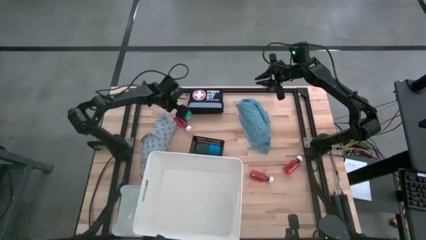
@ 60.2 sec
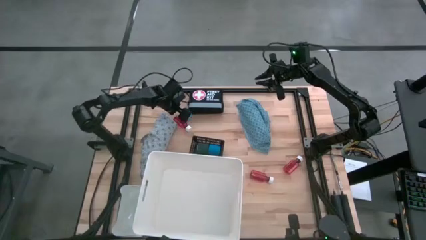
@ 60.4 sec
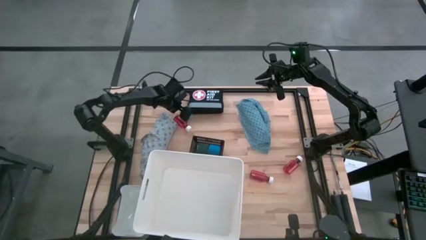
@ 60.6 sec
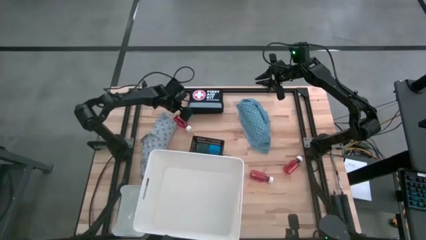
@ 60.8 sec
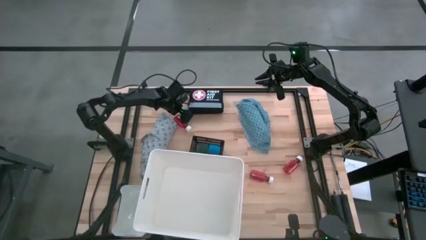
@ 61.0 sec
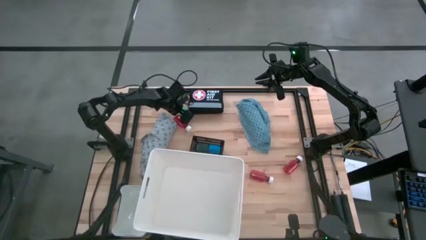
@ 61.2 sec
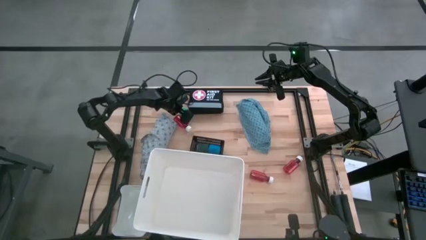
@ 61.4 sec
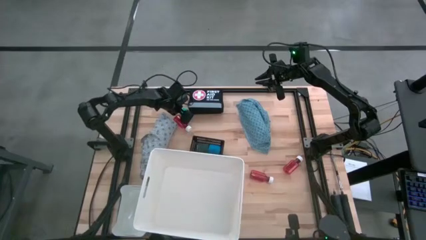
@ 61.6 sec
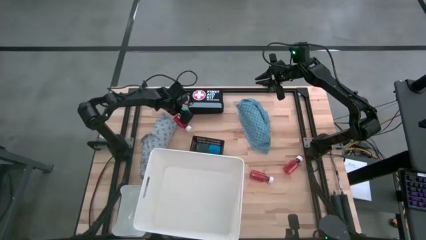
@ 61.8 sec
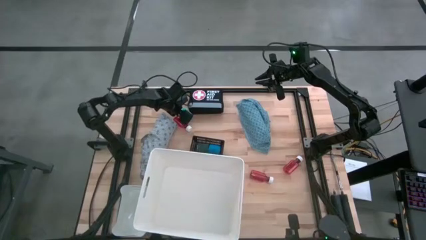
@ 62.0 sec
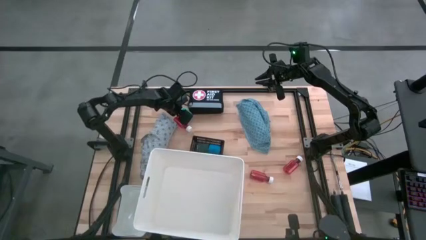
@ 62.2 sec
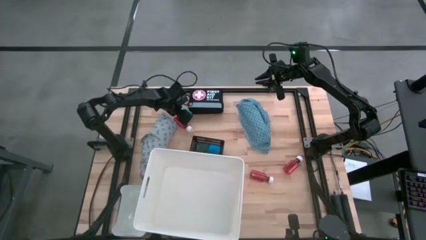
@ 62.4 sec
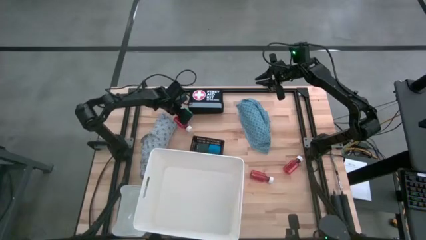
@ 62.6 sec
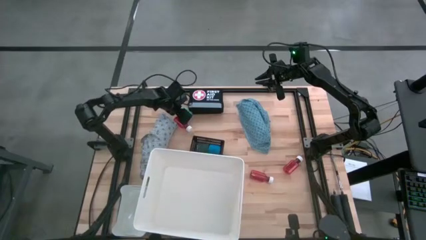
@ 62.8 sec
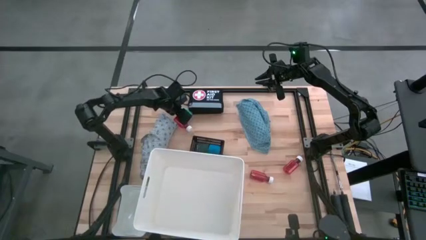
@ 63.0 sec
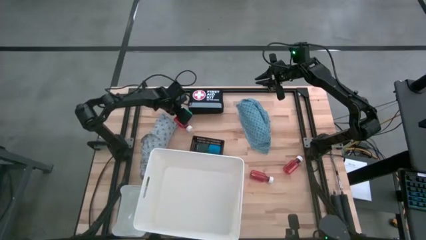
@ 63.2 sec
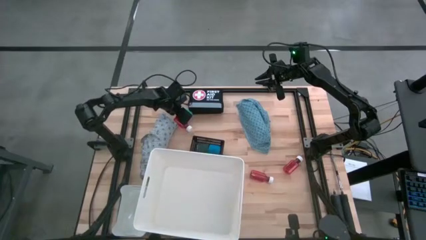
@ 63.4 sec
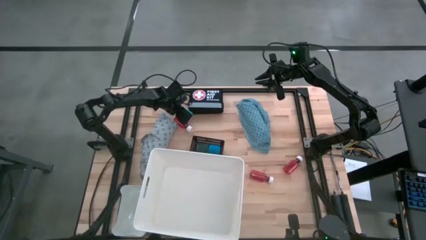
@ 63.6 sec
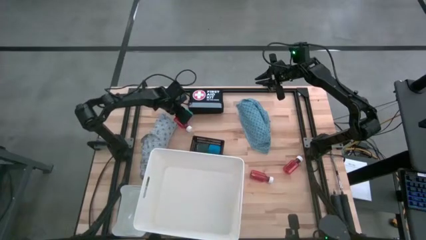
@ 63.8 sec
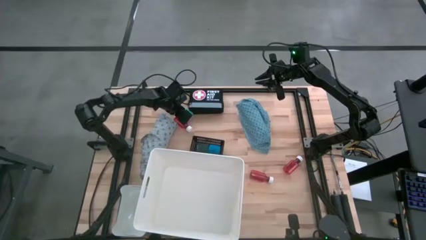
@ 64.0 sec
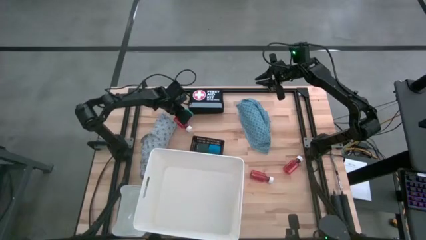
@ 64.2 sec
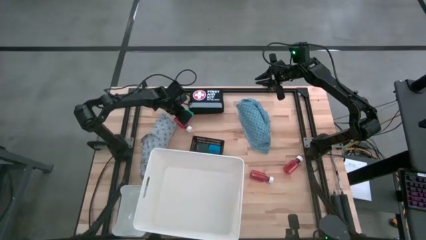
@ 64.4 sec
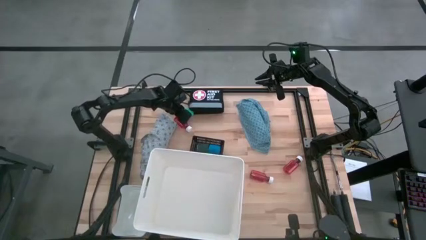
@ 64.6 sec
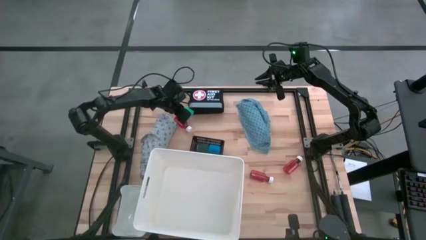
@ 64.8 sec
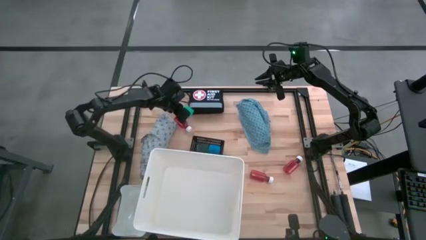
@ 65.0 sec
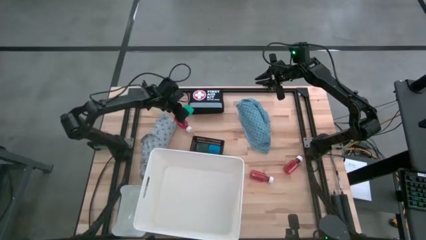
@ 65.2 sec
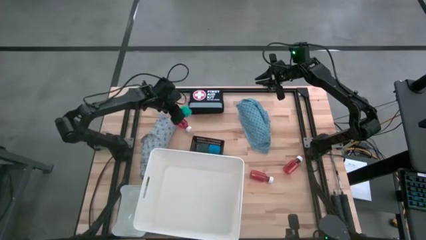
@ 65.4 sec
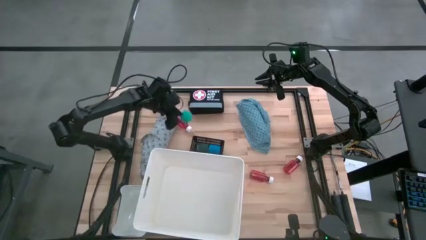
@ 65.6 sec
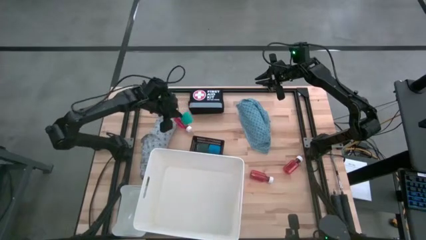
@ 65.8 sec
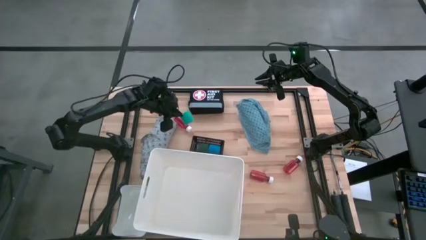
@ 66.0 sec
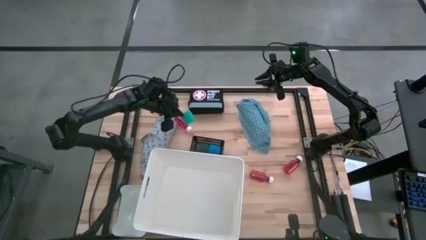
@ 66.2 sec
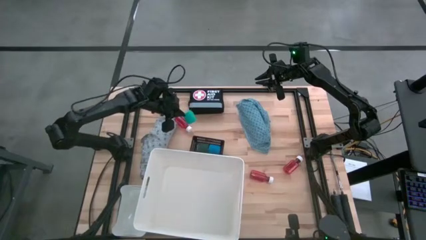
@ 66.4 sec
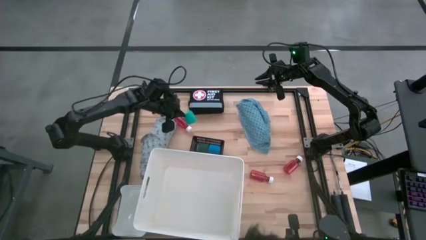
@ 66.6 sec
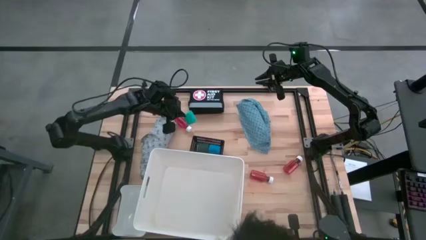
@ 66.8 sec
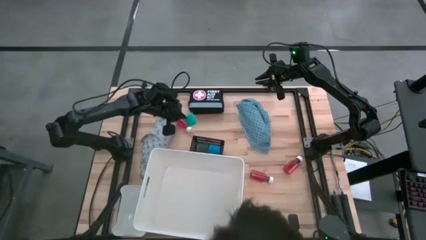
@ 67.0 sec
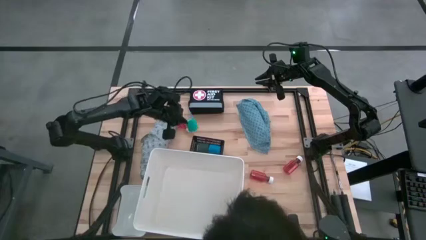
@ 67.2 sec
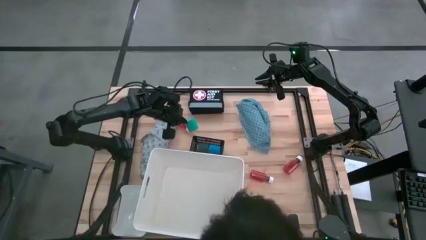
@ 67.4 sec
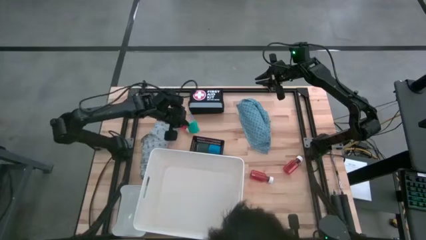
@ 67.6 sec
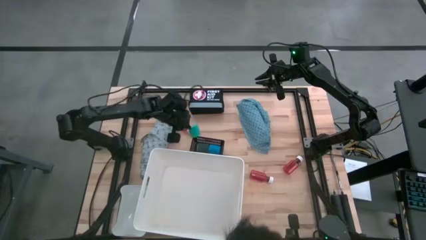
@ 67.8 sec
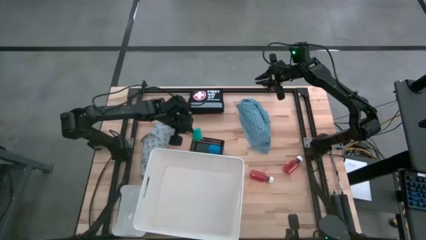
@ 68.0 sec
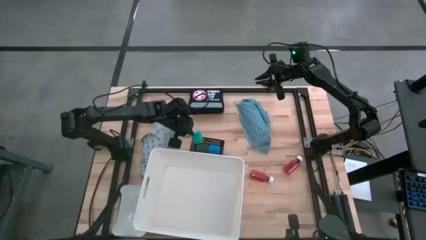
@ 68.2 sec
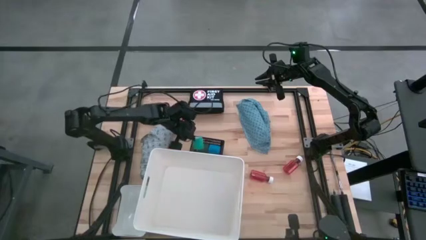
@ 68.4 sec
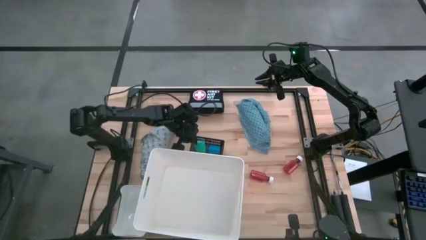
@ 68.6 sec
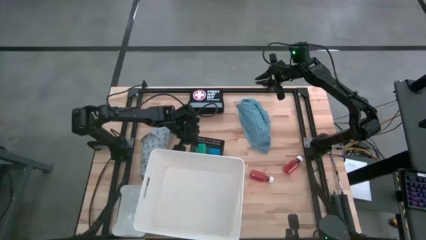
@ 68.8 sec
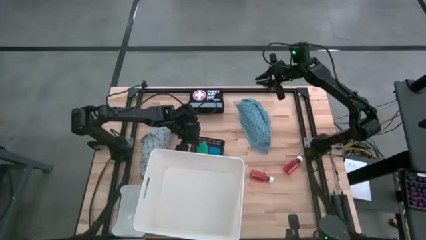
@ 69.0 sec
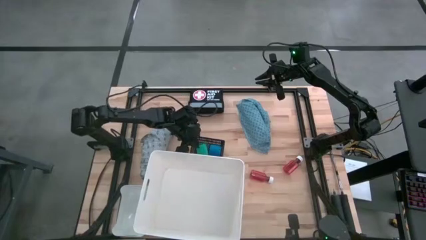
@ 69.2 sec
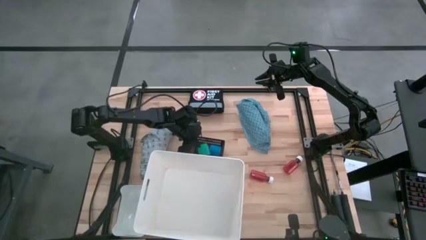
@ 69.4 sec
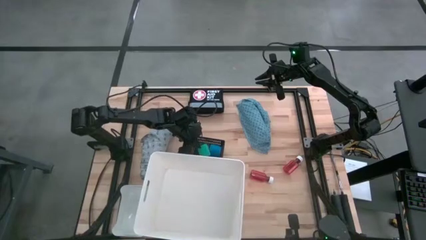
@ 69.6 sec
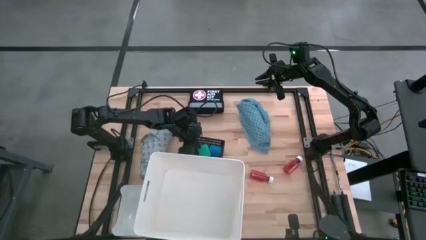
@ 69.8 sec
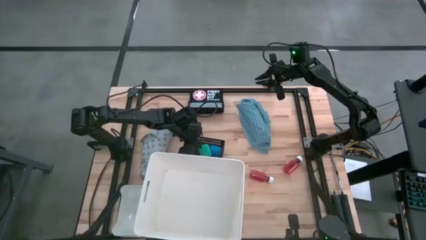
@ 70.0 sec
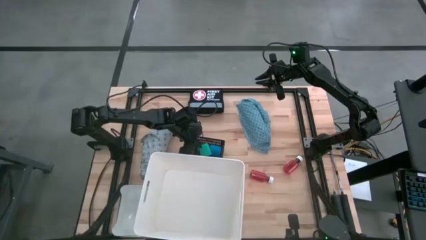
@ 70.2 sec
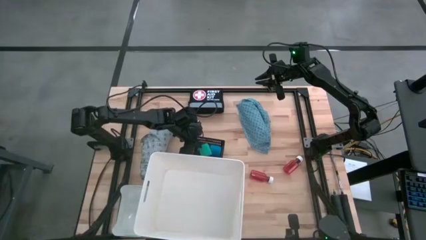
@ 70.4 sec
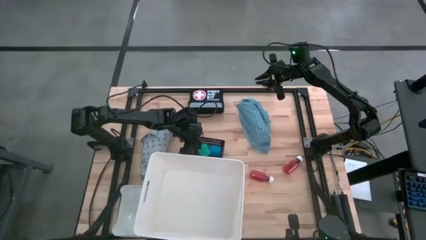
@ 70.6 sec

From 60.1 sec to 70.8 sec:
Task: Pick & Place Medicine items
Put the green bandage into the black bin

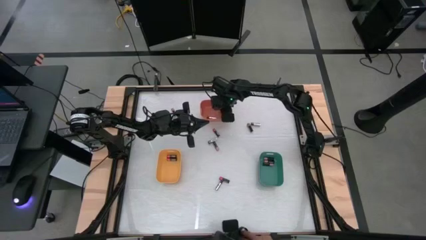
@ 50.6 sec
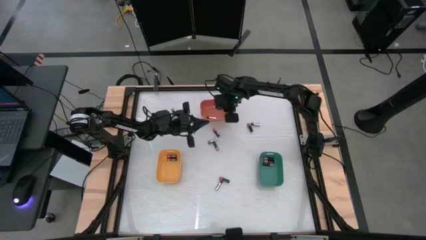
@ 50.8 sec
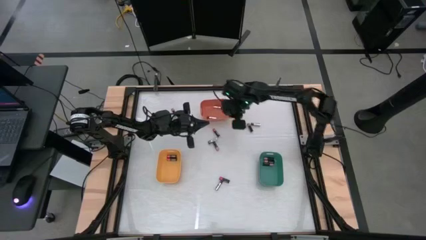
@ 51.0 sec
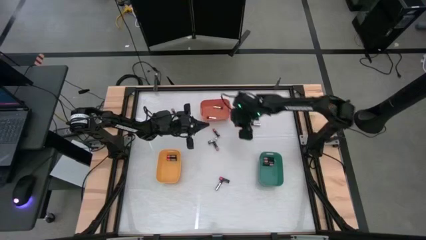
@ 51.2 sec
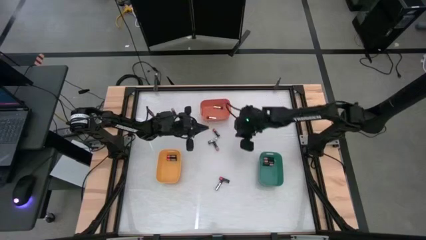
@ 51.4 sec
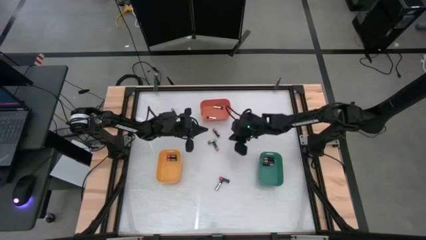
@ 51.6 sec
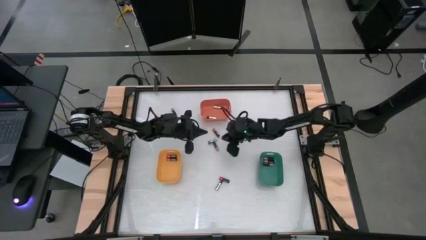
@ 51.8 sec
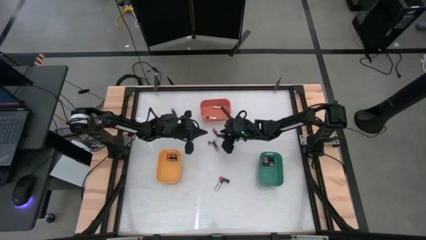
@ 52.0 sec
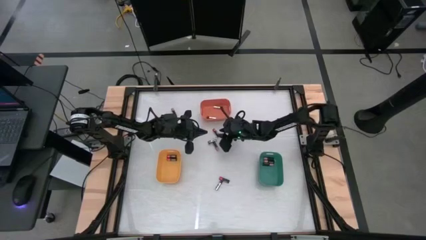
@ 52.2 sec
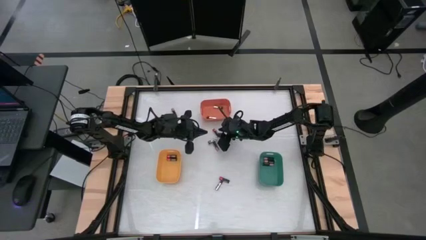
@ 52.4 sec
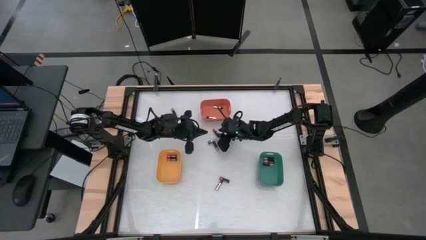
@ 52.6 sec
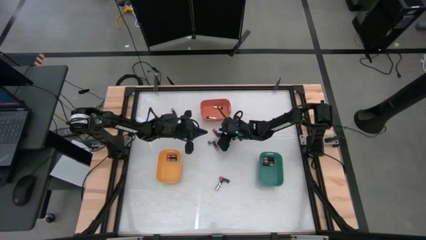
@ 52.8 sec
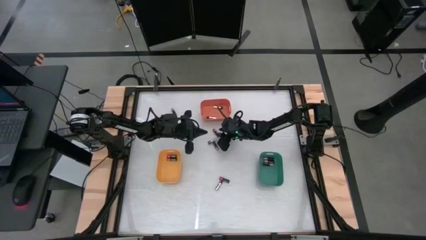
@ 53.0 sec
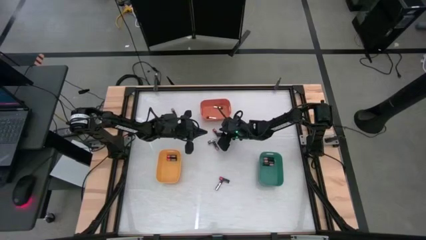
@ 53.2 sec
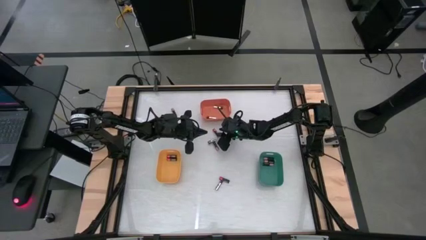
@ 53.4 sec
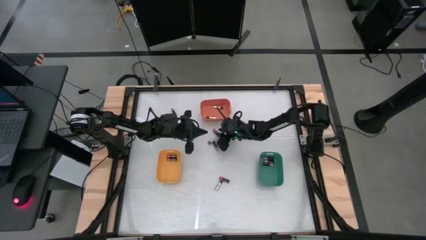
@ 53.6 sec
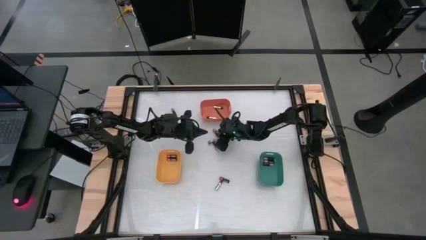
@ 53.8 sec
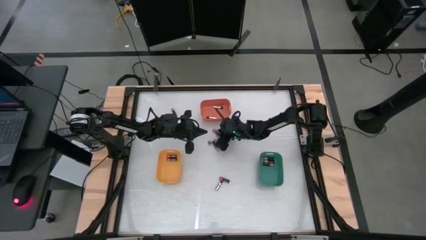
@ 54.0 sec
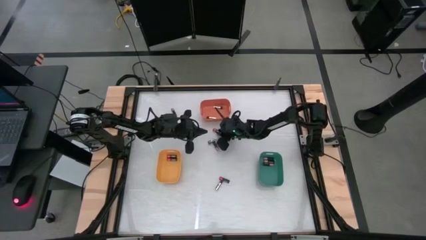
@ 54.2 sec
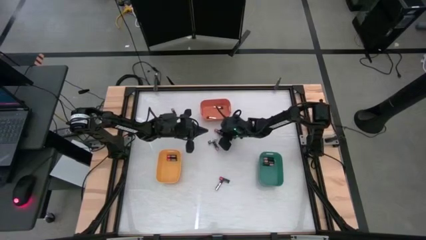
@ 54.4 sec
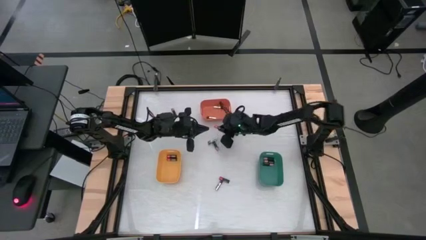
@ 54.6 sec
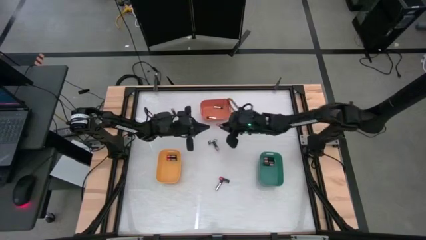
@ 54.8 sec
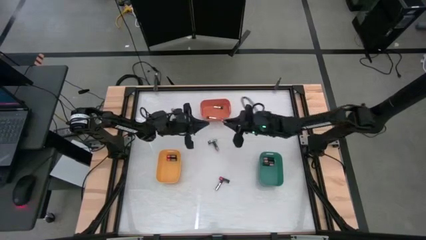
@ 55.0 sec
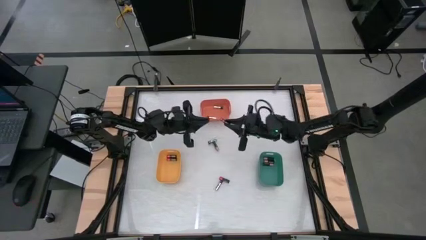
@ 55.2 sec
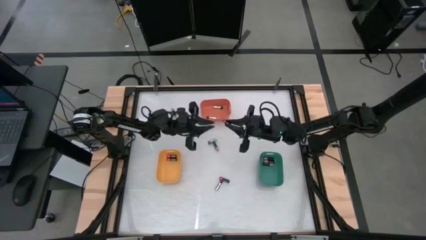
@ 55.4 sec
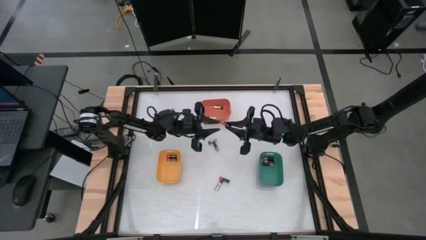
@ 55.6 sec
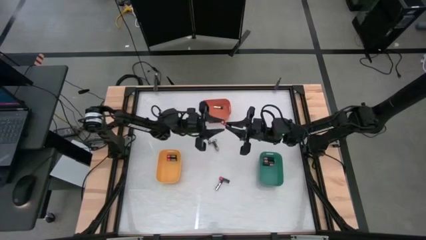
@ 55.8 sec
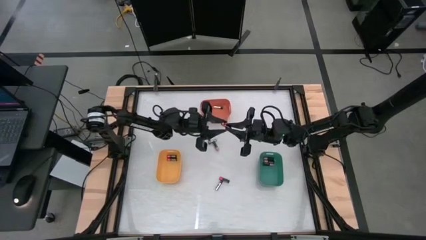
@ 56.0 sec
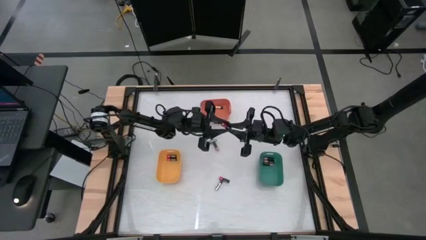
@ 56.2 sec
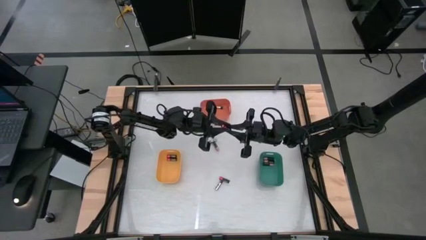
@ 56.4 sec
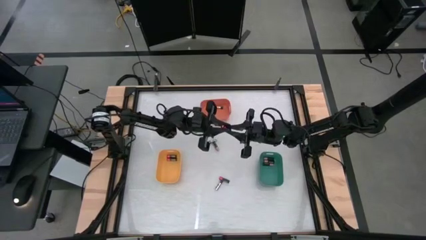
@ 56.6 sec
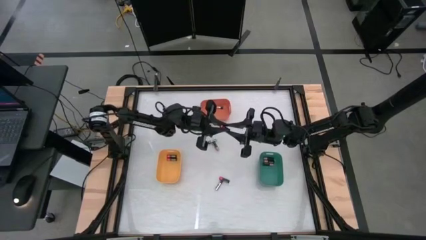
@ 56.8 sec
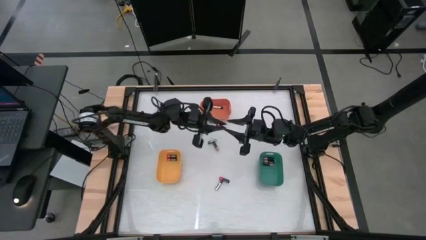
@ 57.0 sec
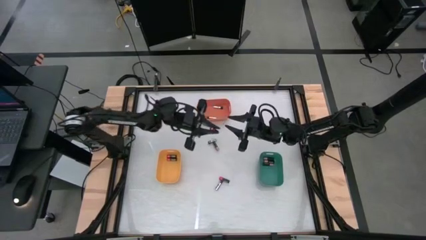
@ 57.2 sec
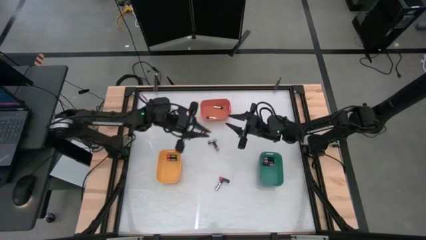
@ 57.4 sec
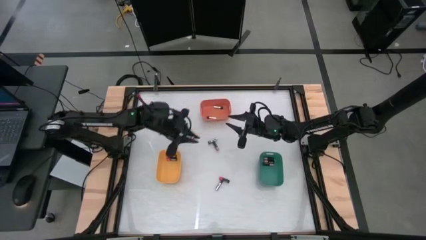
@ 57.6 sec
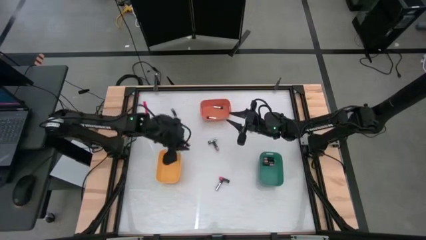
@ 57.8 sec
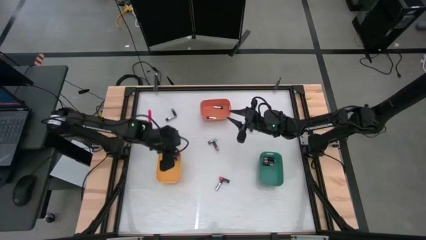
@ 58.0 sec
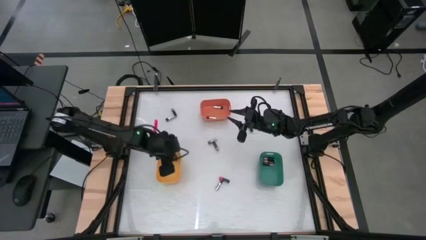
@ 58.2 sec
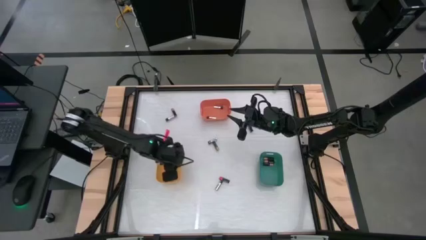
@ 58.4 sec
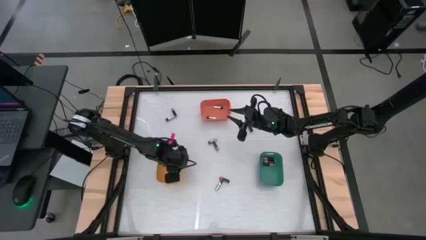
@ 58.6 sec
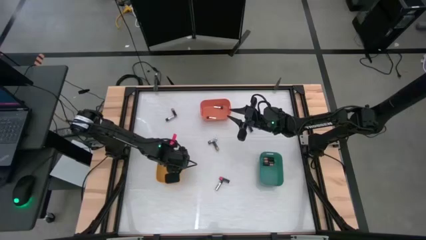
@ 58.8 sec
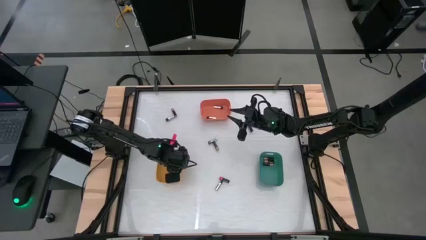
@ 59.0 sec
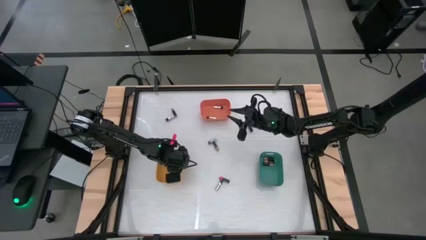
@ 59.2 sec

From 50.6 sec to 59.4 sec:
Task: Sort batteries
Put the red battery into the yellow bin
